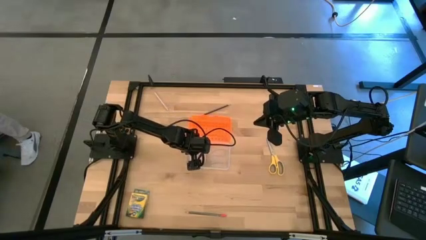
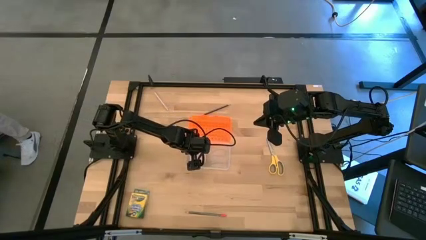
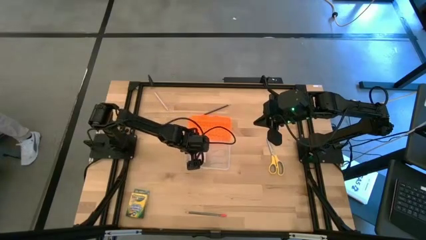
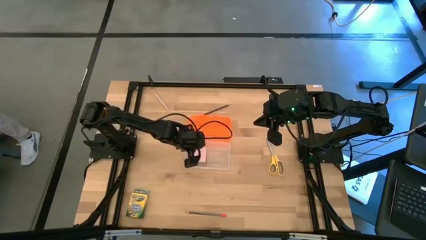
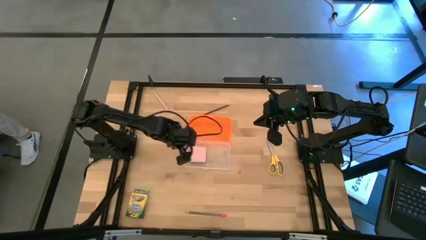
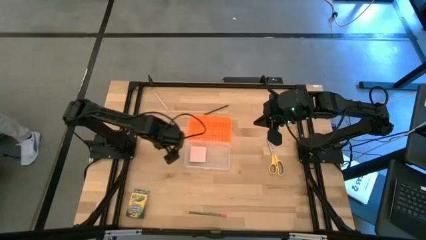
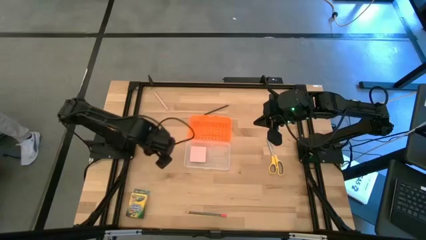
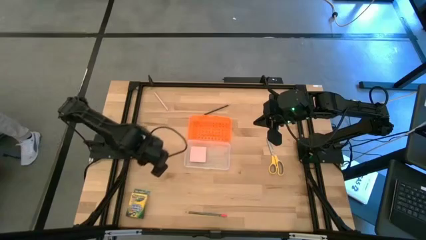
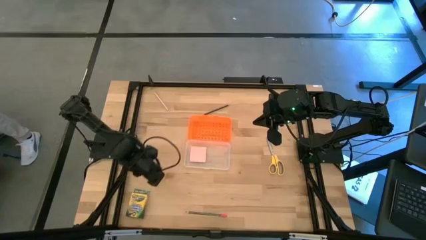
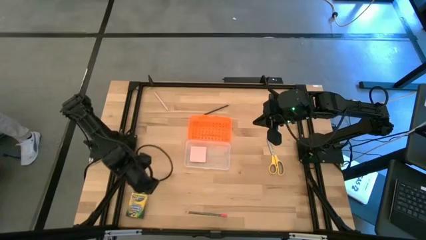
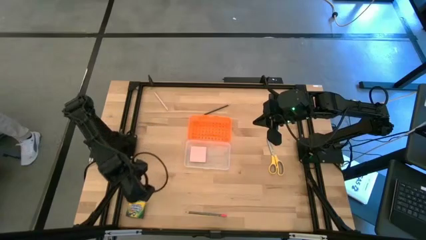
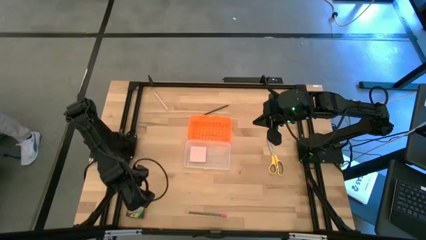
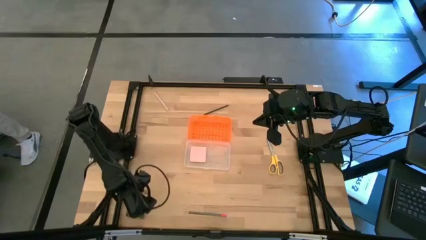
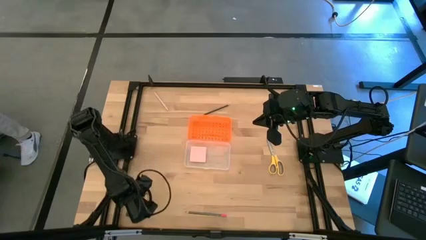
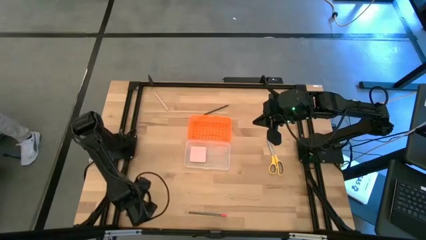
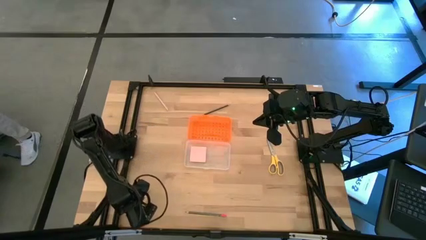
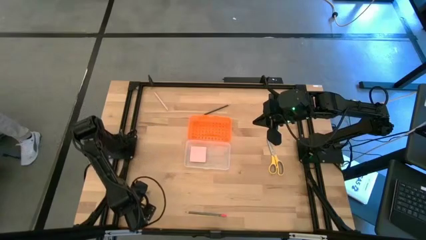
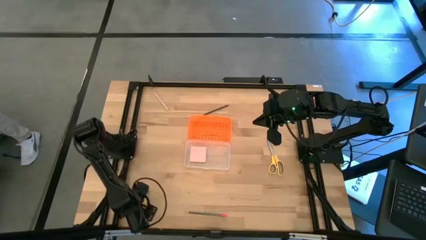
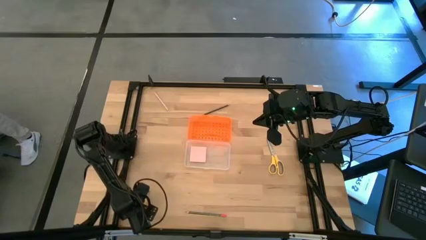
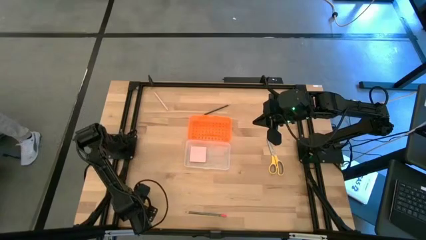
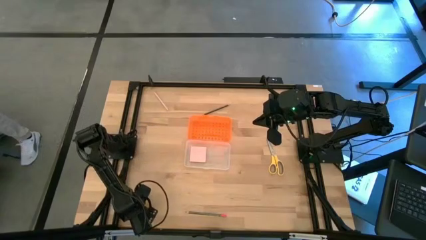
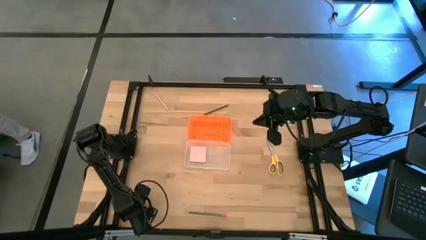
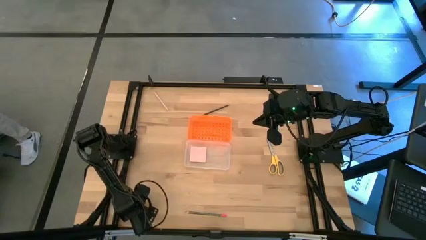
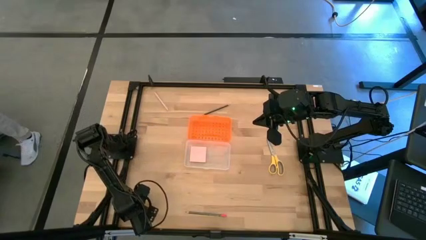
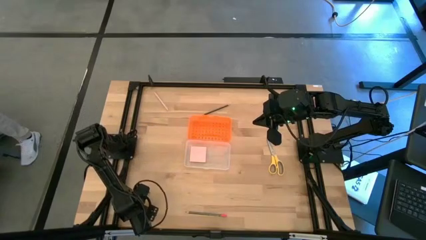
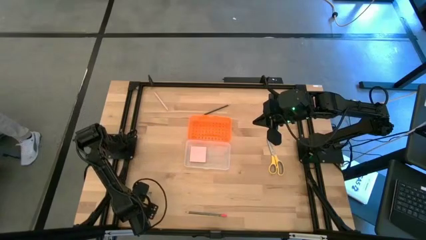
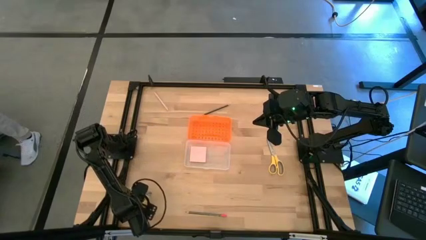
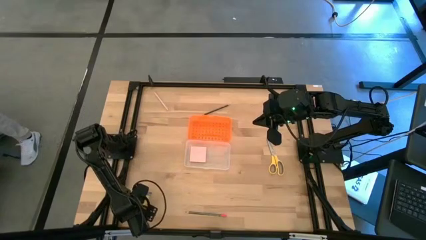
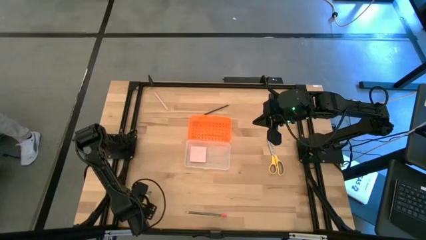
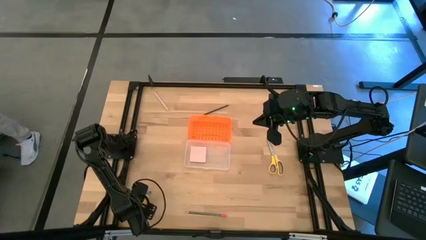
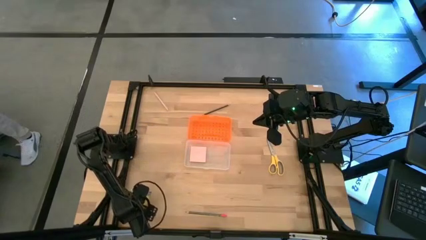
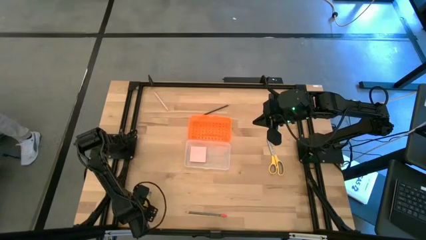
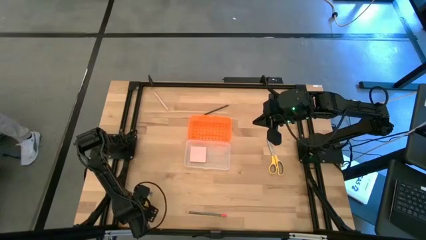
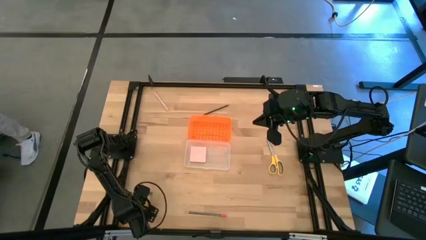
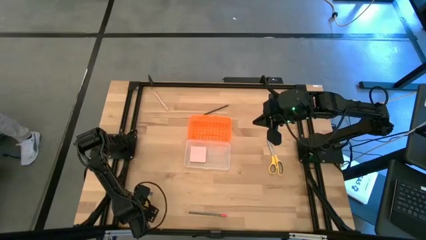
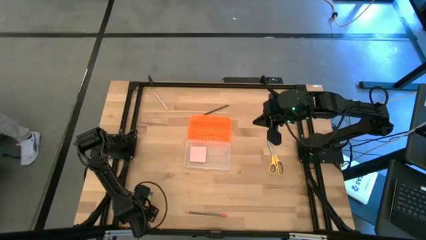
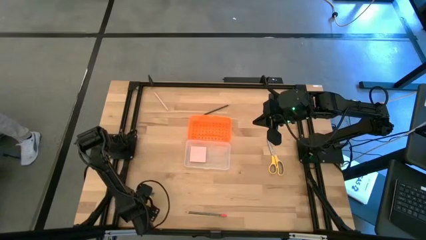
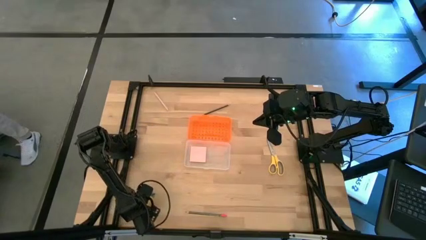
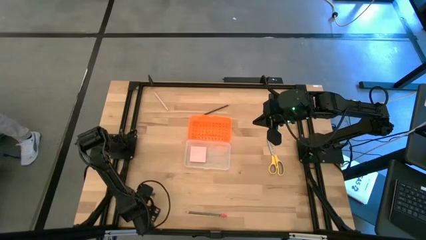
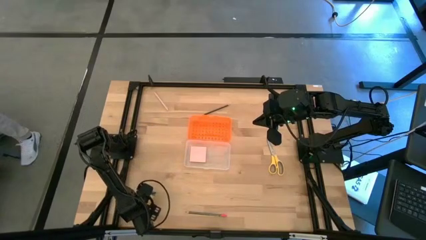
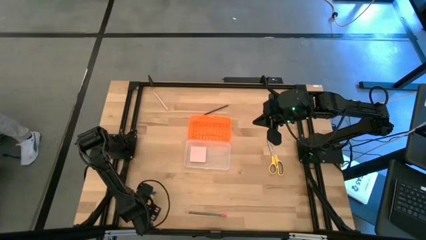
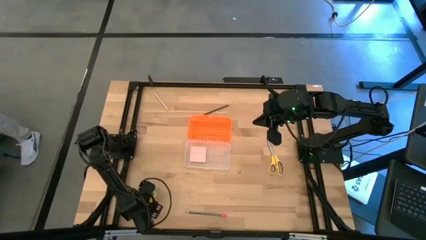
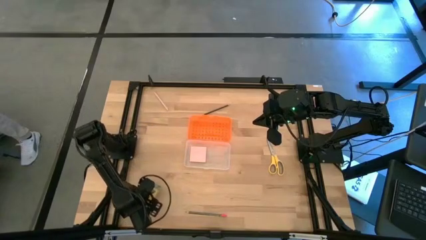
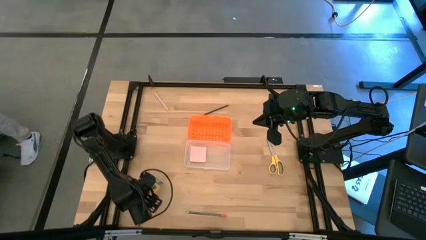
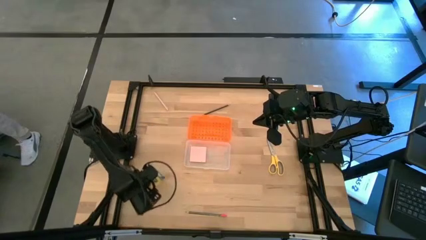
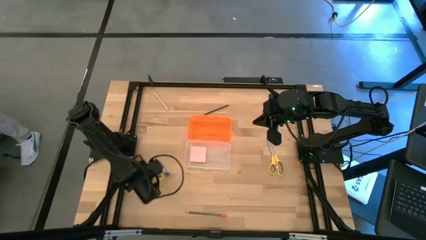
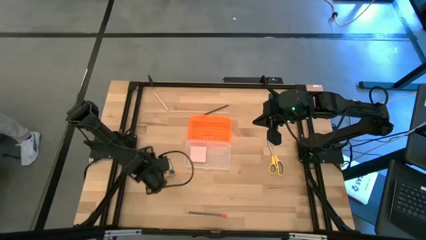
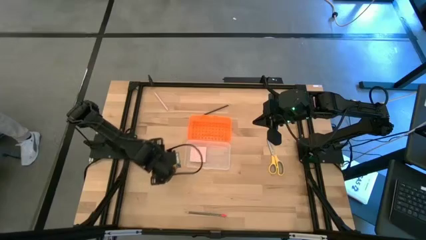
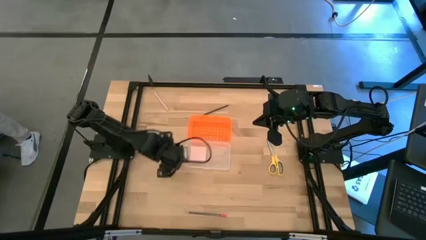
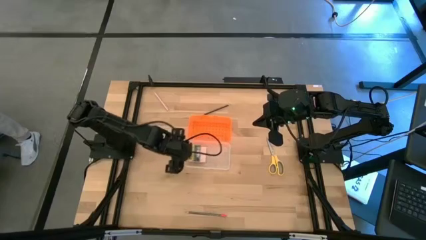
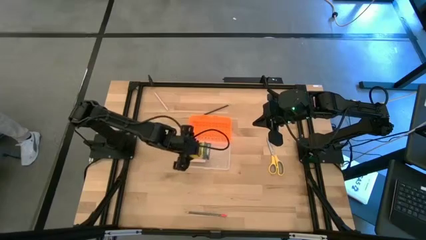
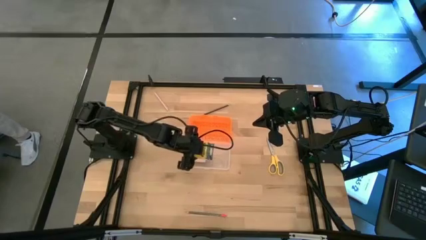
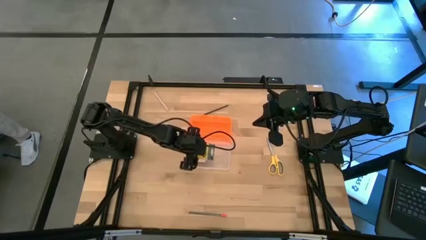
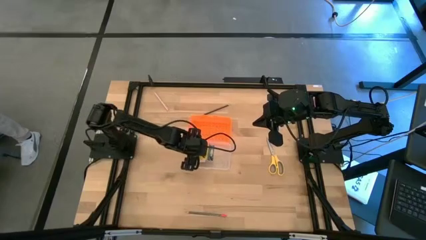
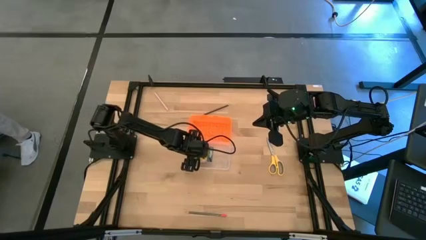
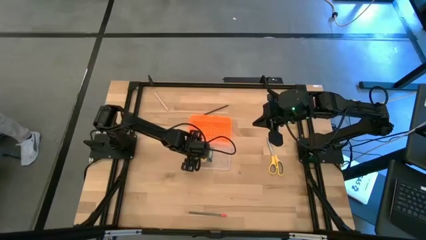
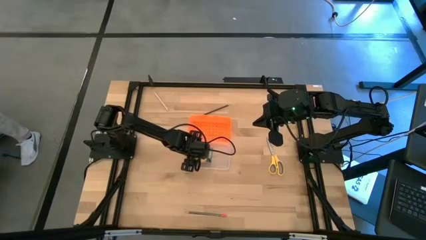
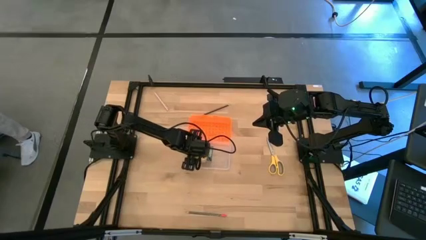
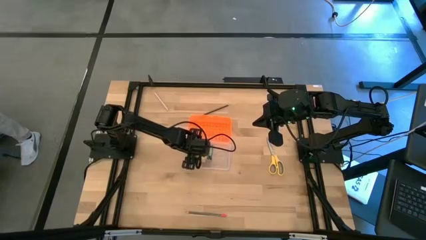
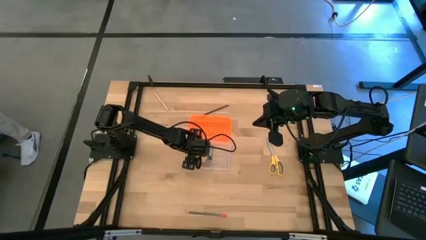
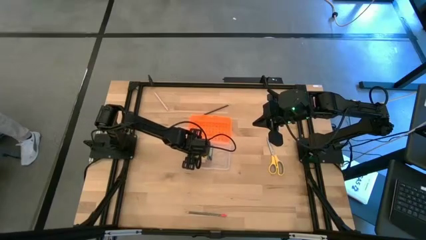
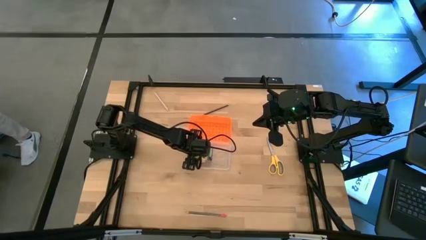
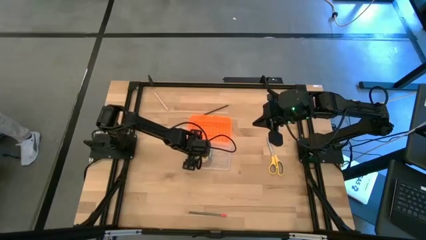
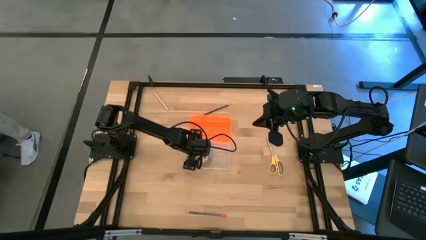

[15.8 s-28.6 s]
Task: Pack school essentials
Put the crayon box into the supply box
